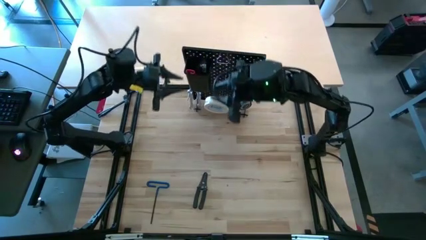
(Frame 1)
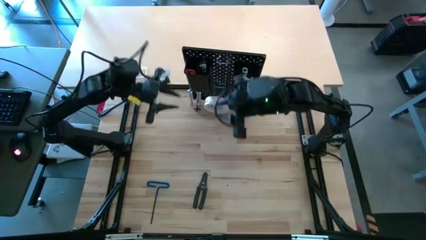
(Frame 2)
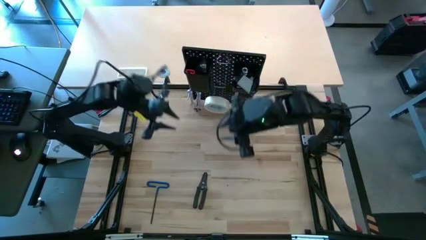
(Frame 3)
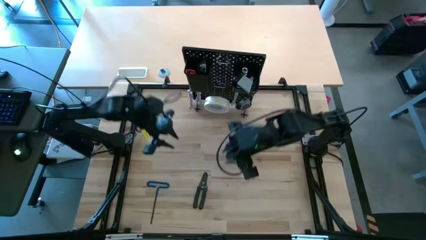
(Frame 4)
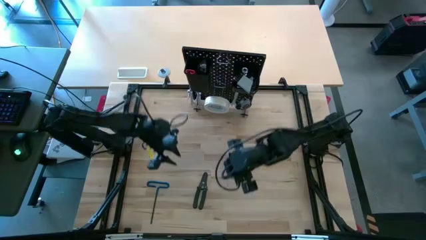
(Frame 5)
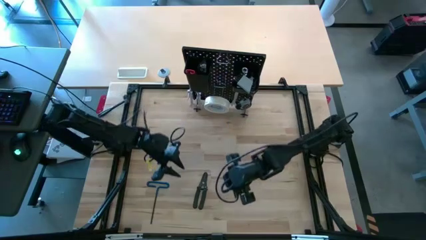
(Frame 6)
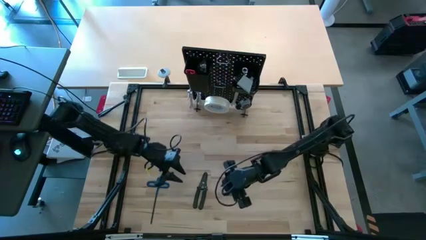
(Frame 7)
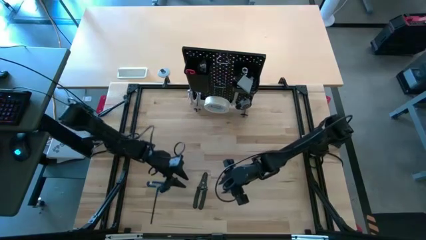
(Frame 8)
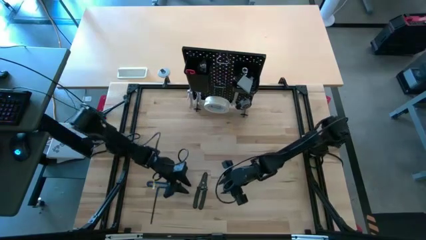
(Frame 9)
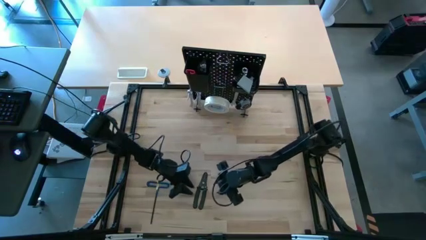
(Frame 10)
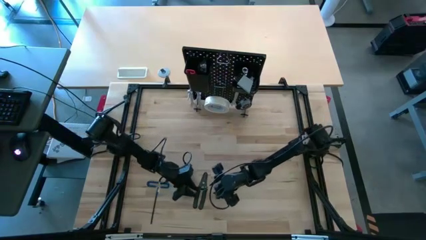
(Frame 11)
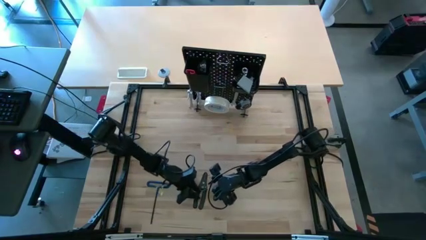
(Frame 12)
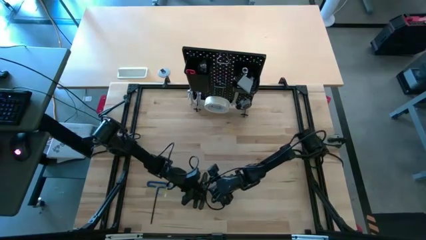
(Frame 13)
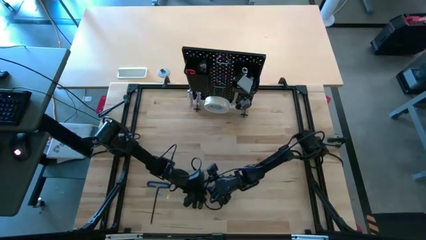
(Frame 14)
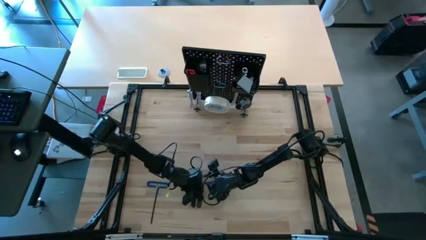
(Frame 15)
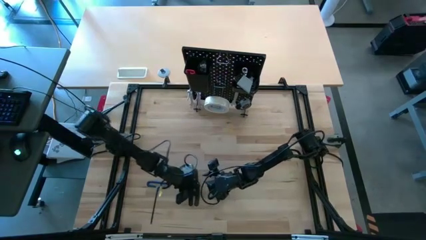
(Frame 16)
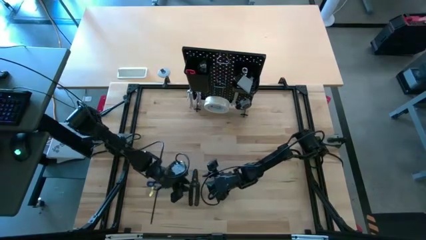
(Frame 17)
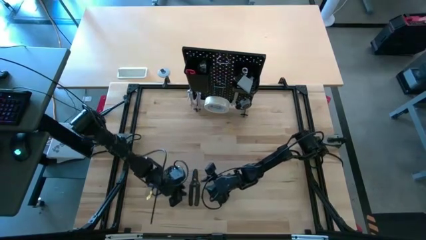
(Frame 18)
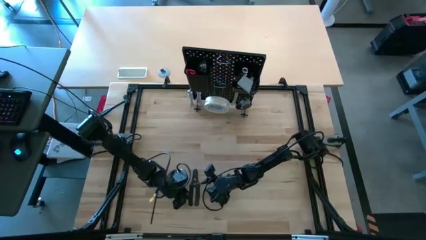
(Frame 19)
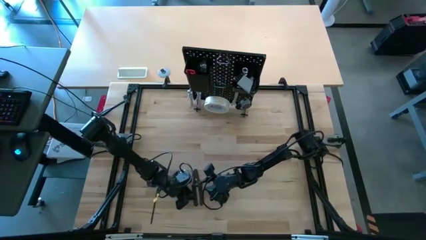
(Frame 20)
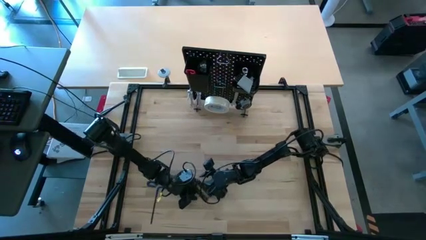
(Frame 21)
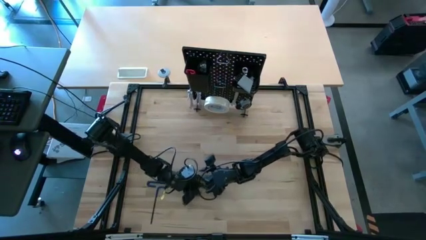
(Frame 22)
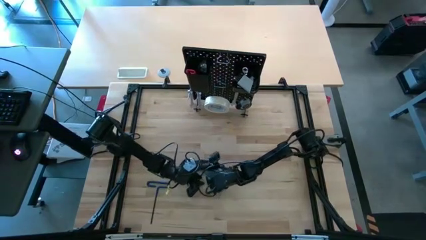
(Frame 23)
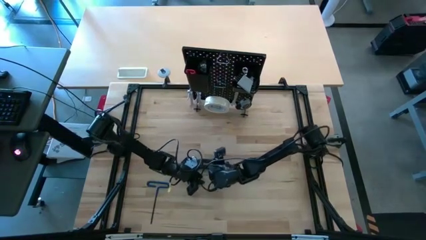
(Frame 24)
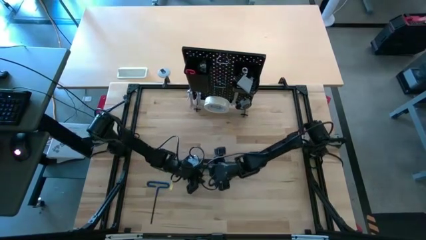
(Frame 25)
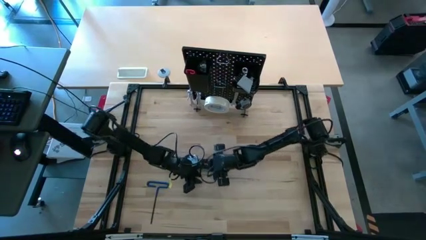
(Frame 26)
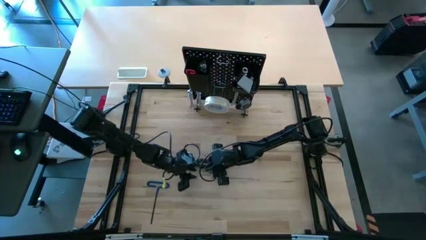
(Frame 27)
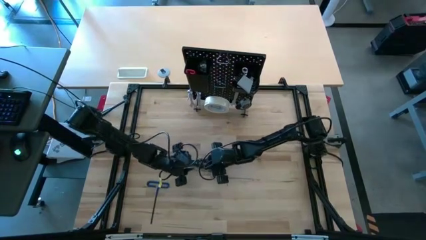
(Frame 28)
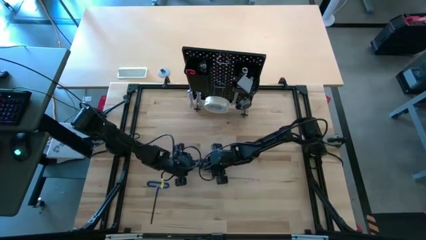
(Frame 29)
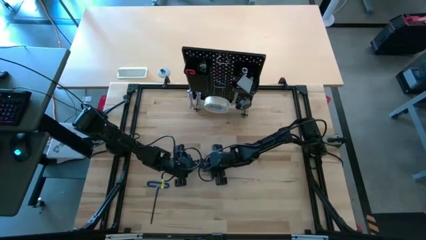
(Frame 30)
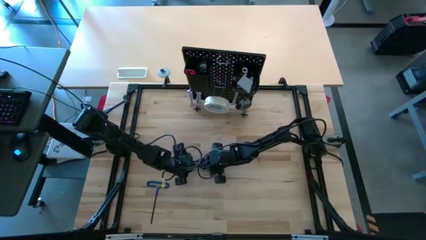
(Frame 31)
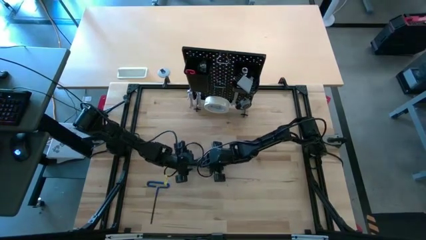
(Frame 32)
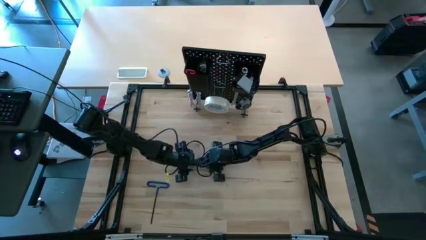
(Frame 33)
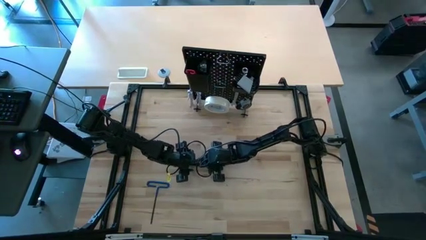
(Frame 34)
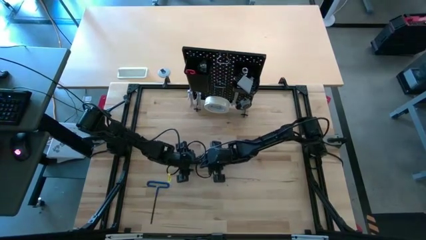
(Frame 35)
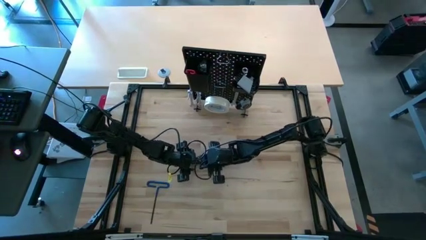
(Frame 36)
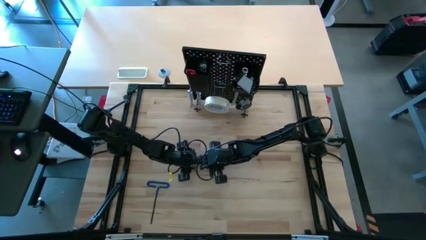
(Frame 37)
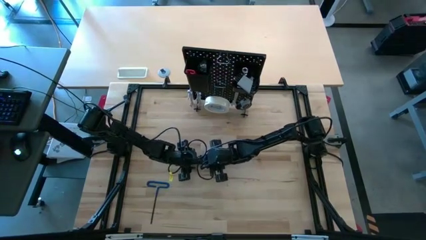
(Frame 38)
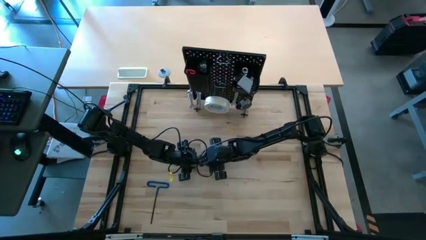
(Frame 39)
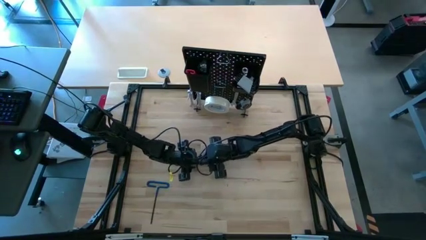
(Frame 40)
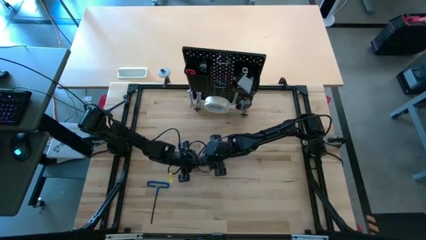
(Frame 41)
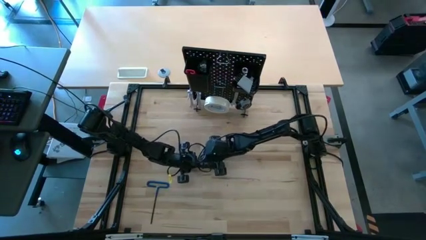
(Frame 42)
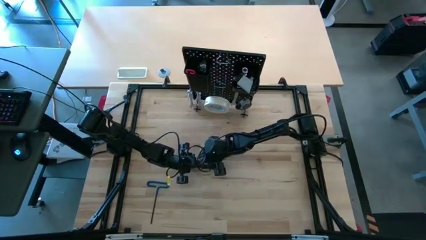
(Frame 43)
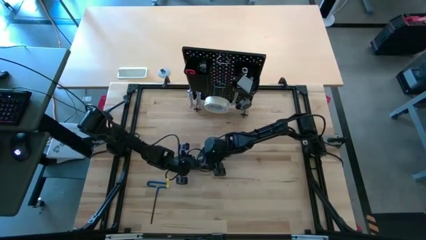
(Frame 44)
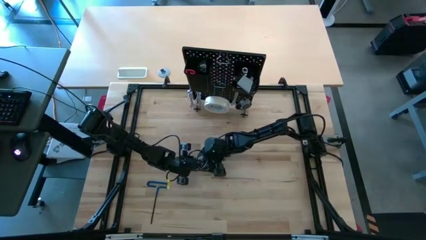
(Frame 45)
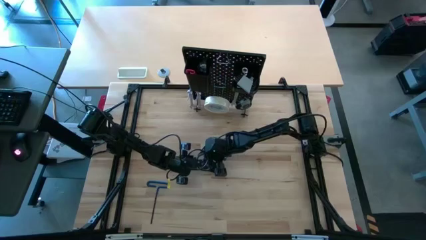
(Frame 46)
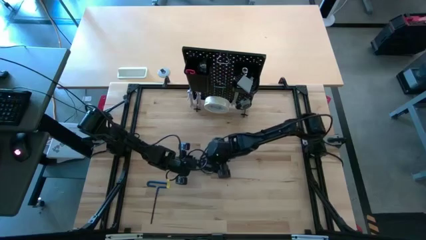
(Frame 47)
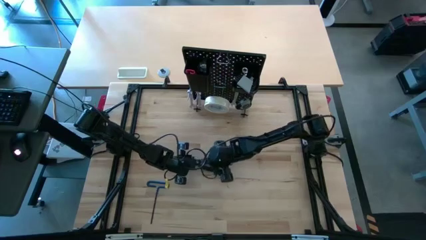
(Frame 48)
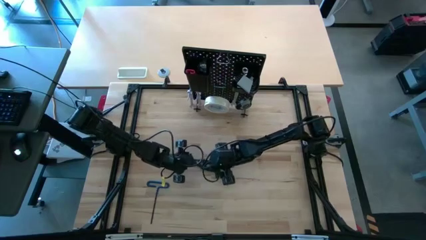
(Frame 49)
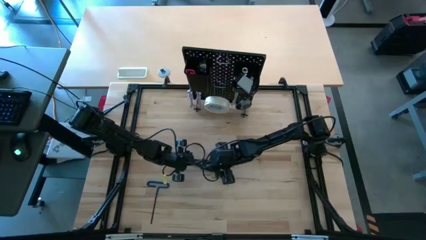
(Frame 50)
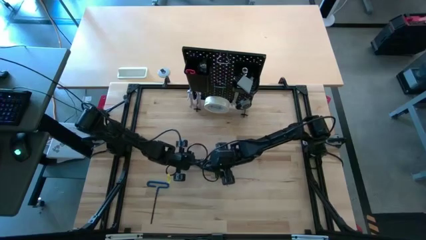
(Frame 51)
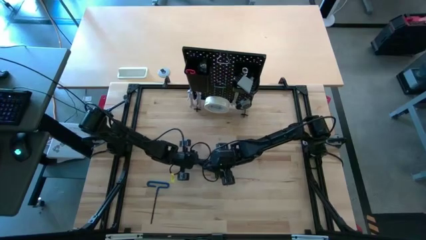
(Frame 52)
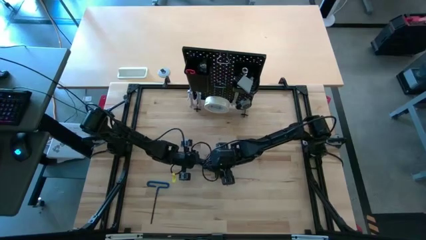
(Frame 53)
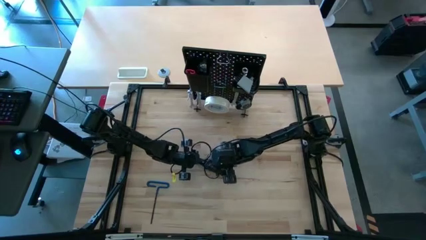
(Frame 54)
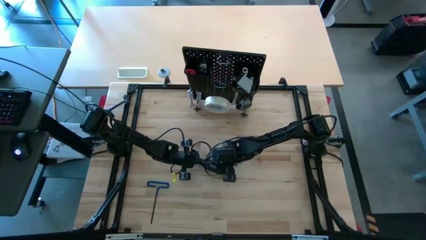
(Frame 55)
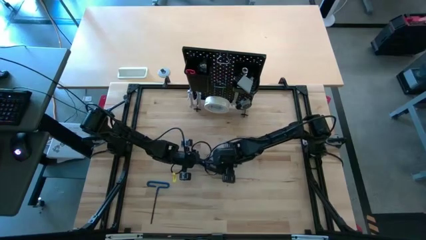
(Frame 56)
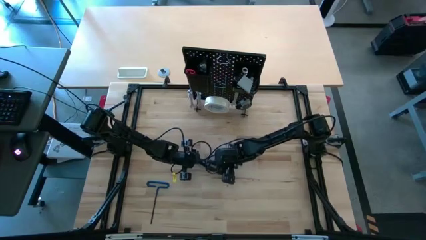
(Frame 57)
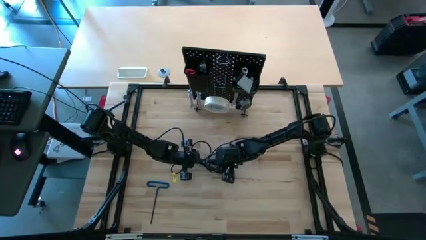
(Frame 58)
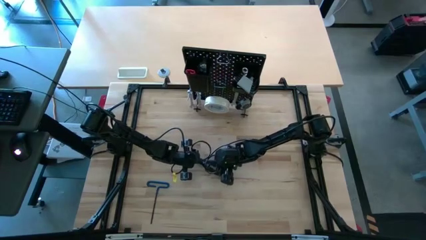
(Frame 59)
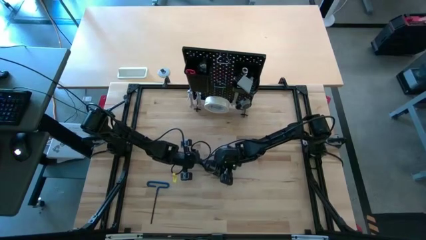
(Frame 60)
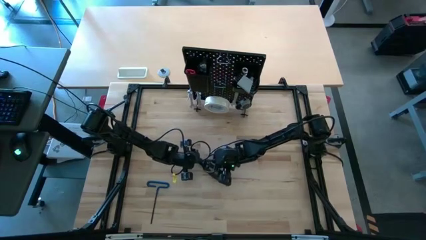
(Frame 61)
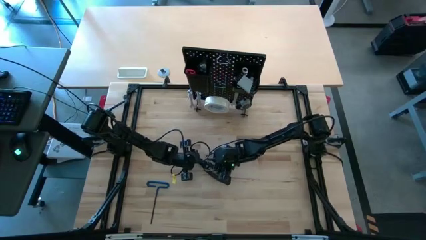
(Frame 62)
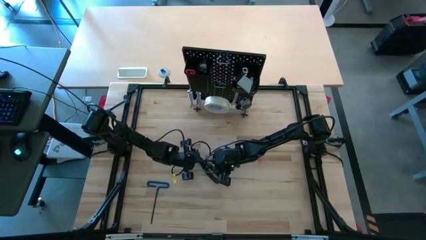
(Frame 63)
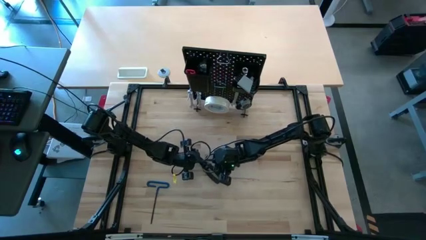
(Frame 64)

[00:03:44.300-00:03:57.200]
Task: Hang tools onto peg board
Hang the black cable cutter on the pegboard bin

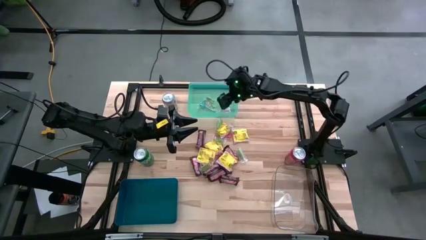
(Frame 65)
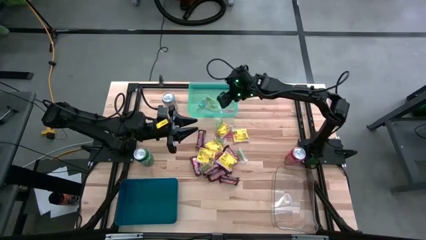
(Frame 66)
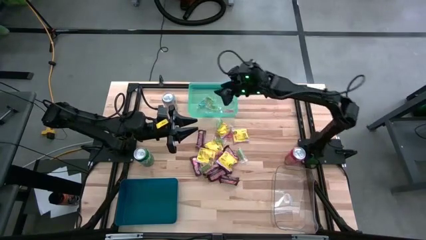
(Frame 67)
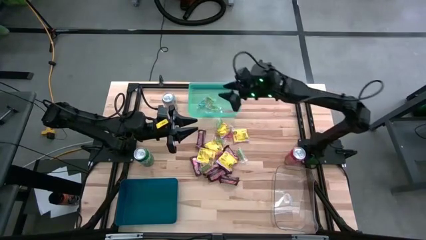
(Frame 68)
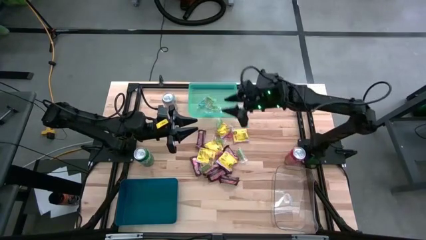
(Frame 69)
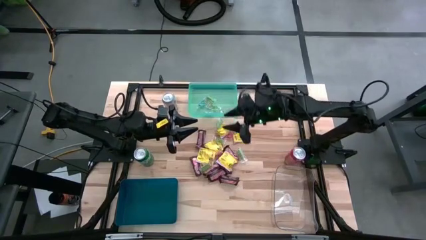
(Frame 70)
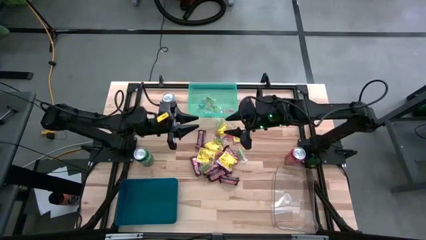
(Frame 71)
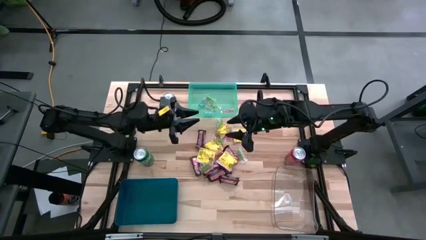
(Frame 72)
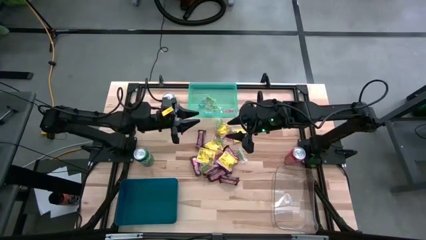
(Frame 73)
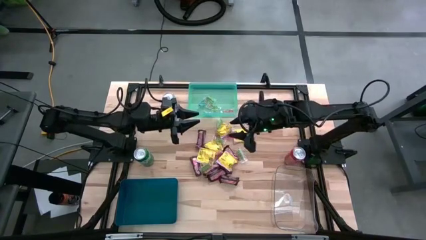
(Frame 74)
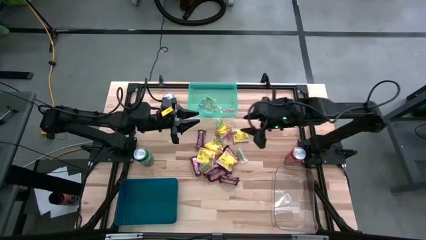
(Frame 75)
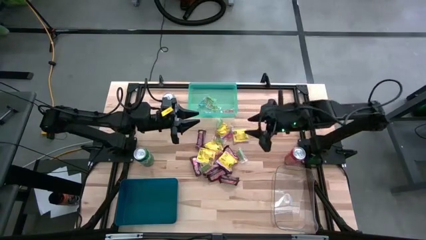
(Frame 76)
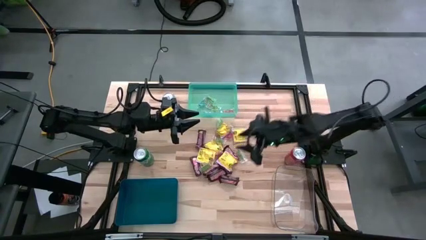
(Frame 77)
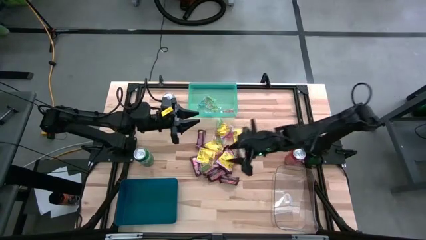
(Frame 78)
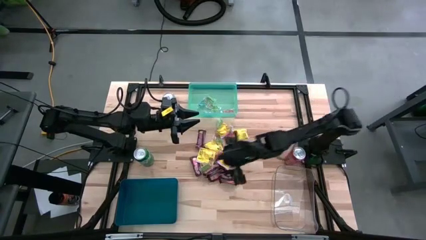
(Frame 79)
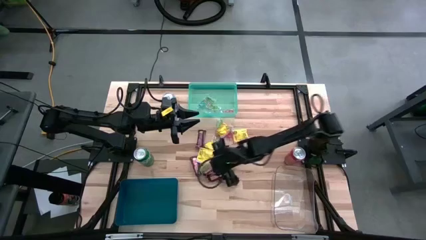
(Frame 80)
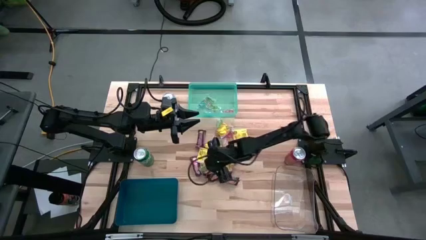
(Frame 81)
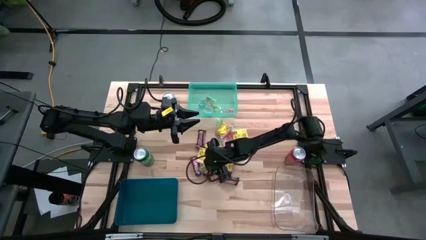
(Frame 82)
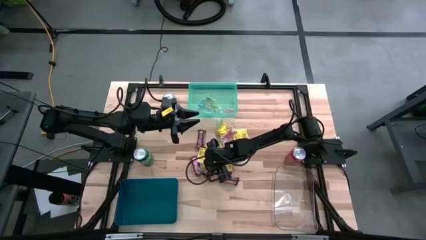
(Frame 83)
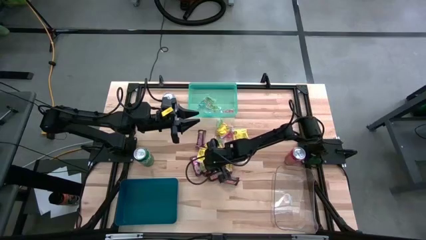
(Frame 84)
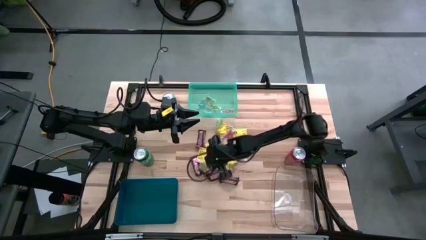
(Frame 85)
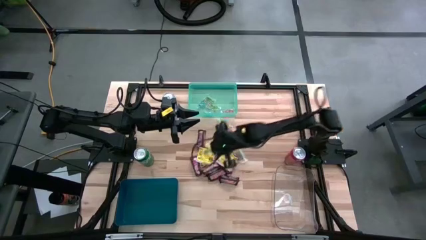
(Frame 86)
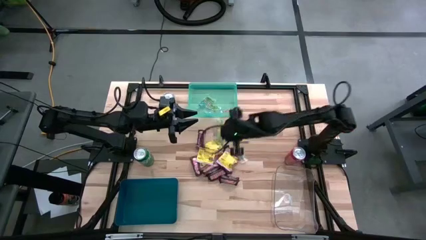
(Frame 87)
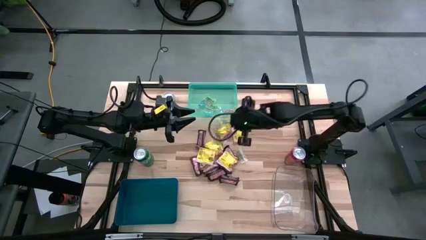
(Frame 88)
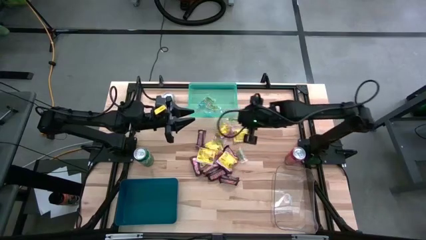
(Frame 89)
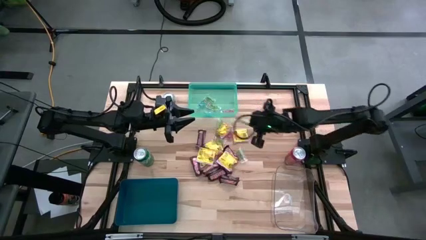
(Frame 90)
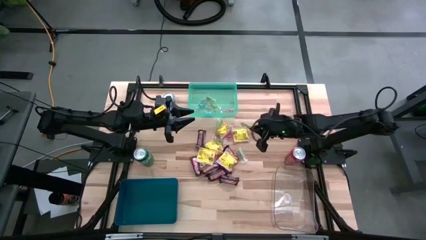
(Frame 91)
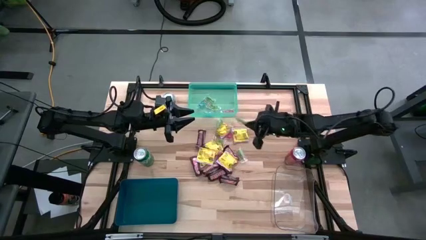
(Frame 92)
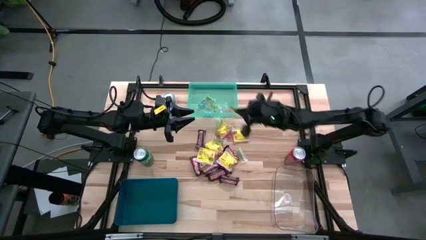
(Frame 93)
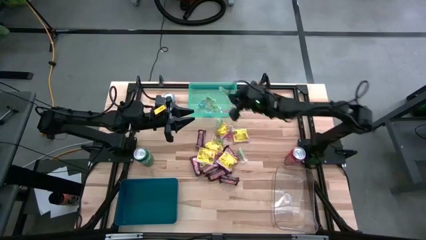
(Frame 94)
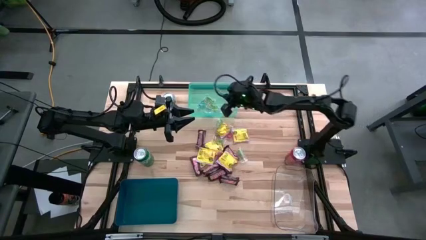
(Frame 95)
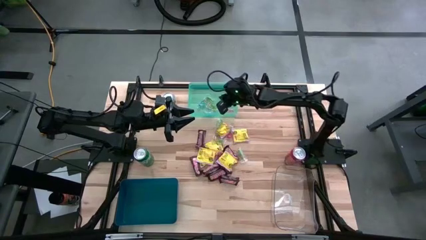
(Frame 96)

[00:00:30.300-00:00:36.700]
Task: Sort candy
Put the green gummy into the light blue bin
